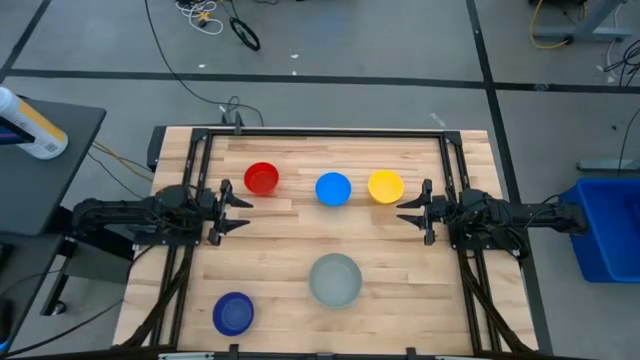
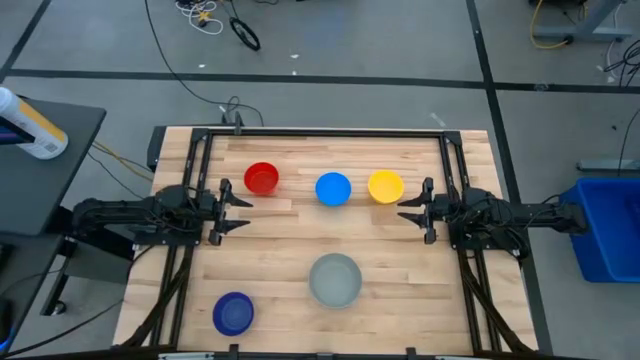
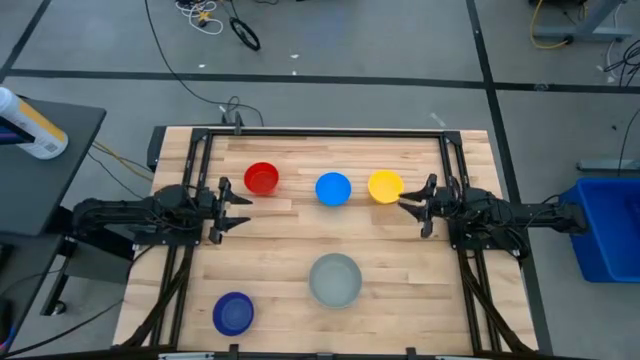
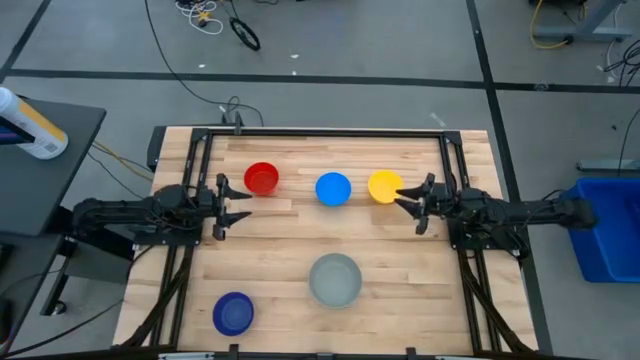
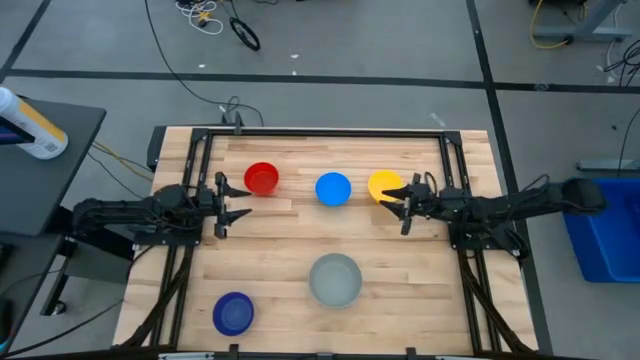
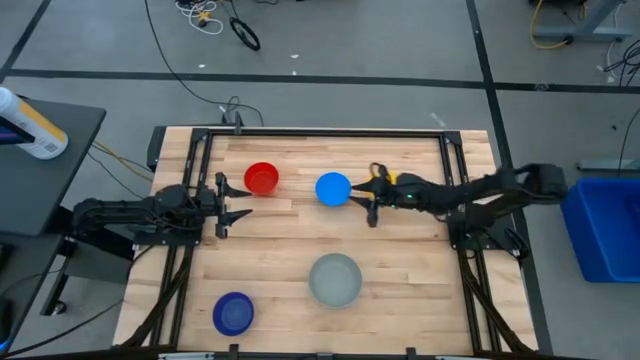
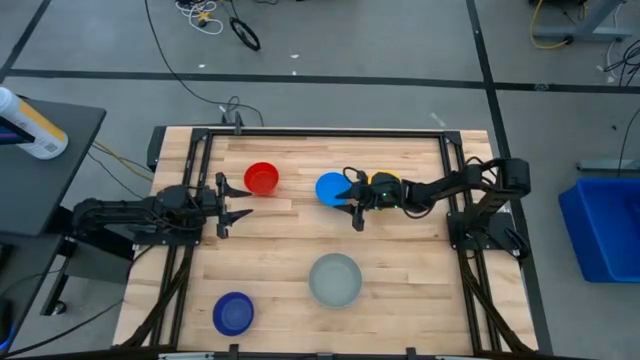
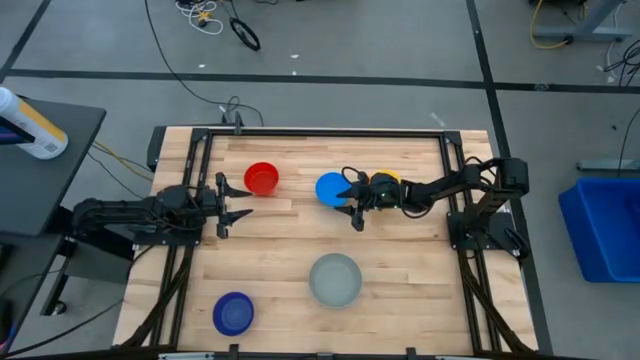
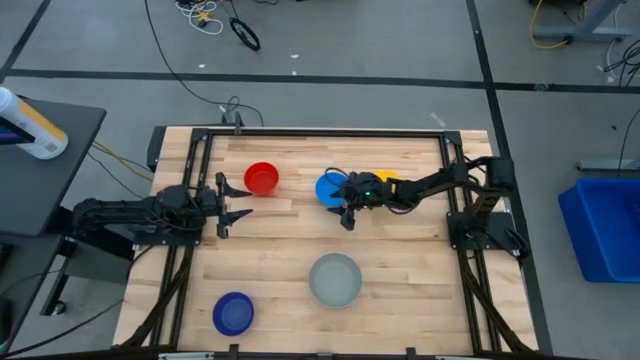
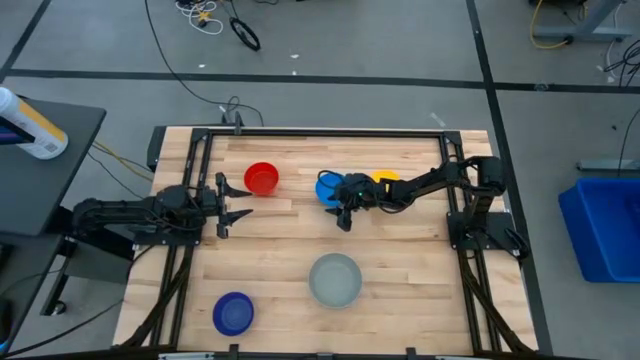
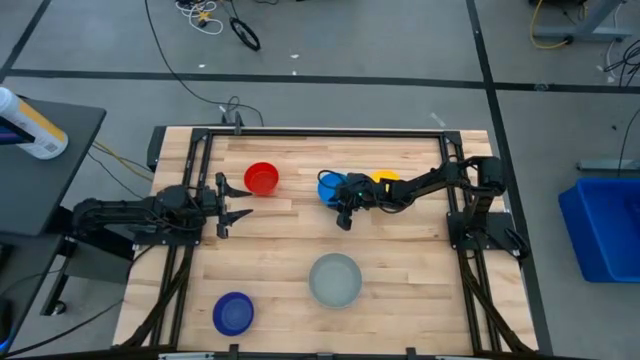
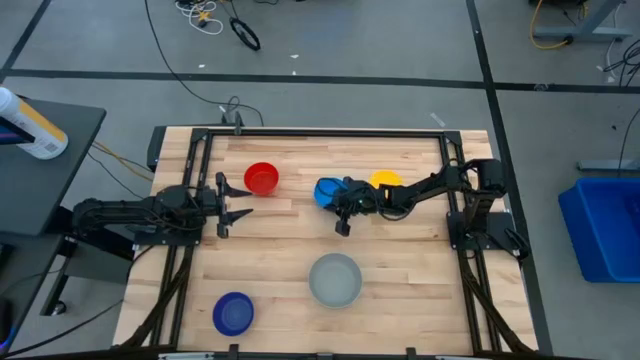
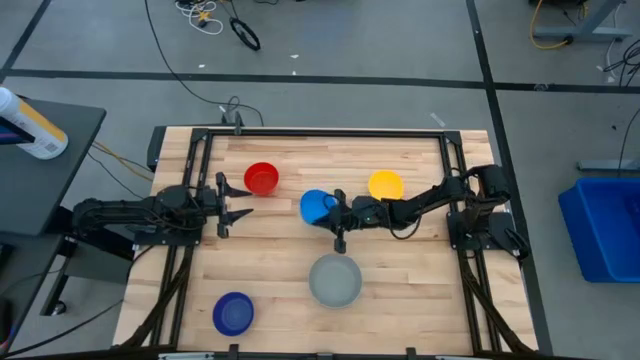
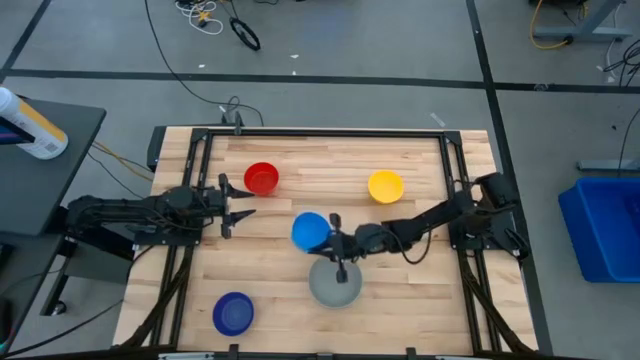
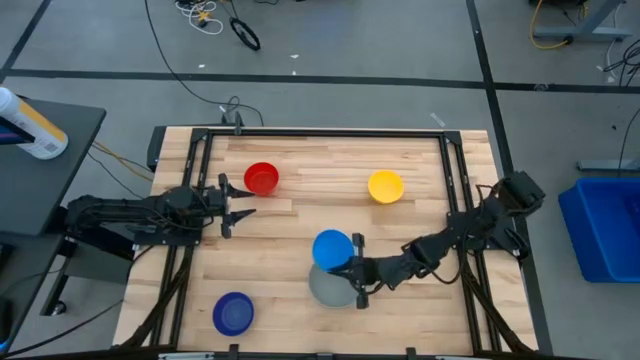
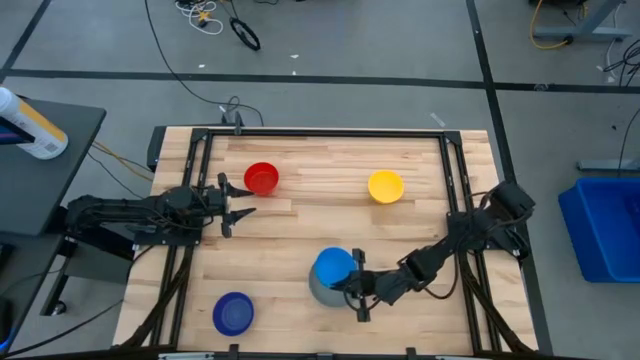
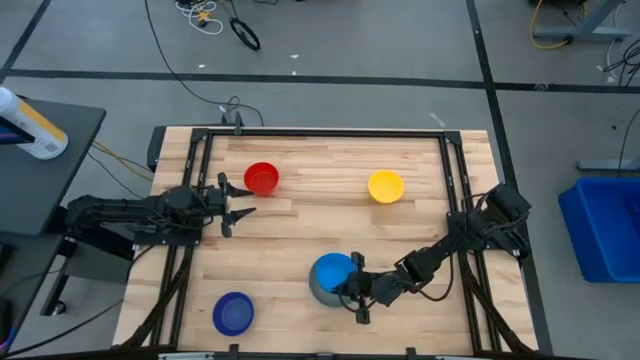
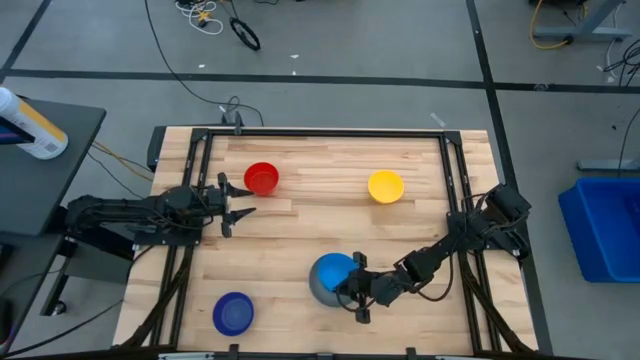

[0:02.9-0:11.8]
Stack the light blue bowl on top of the gray bowl

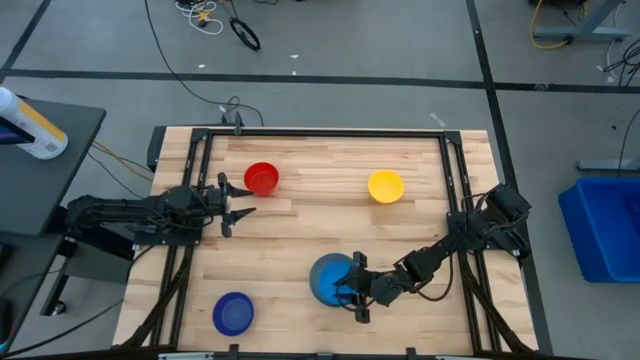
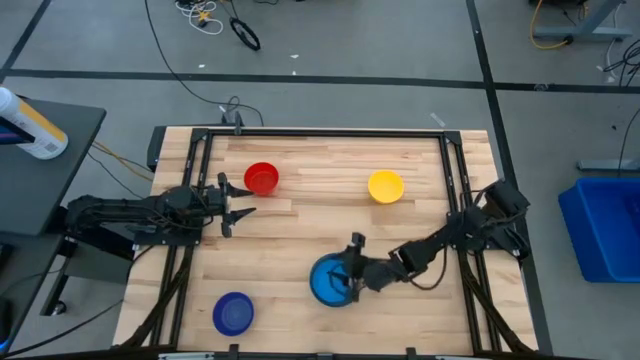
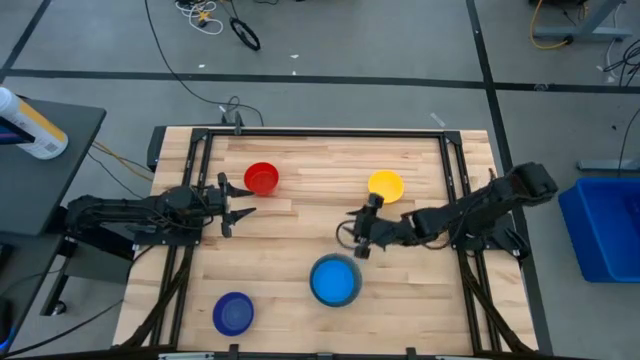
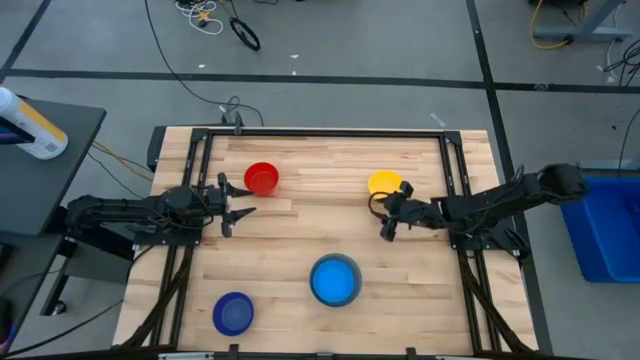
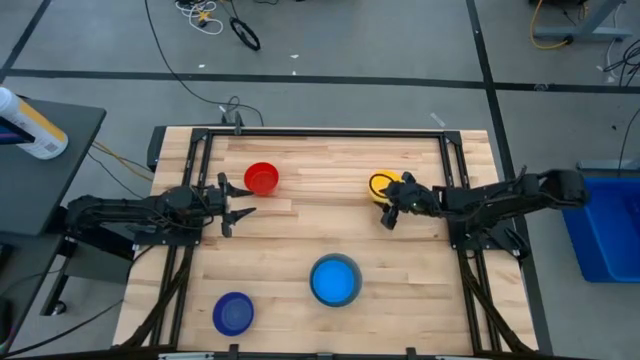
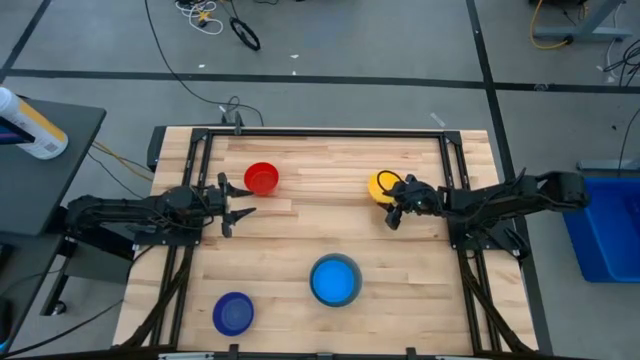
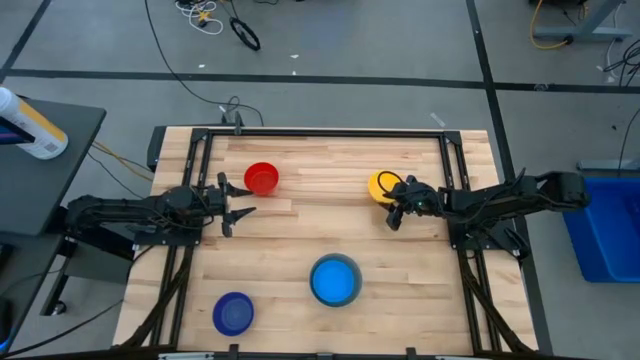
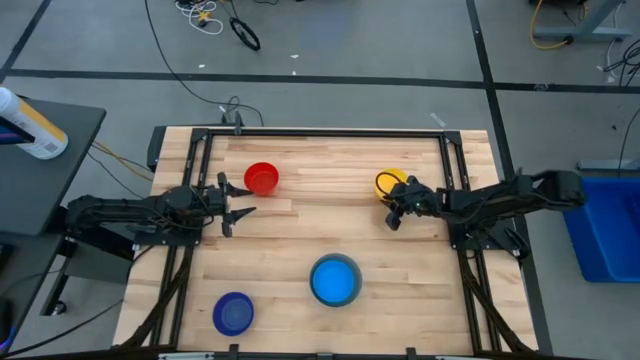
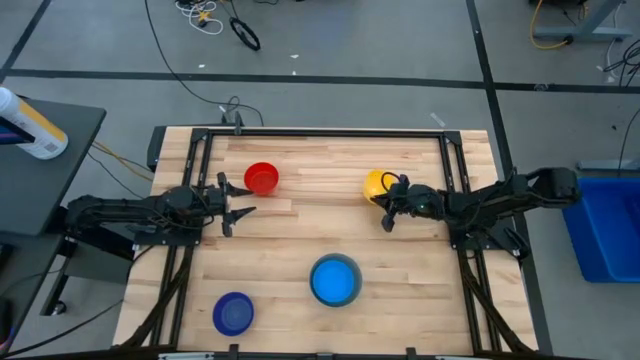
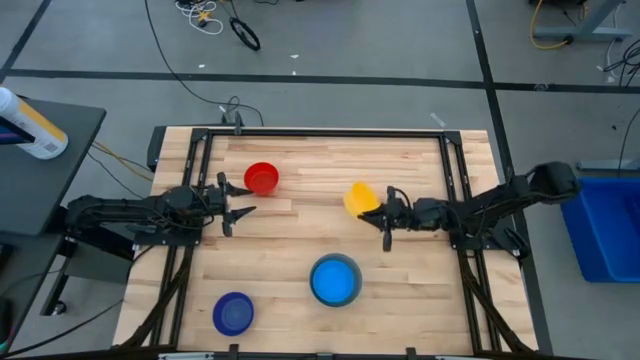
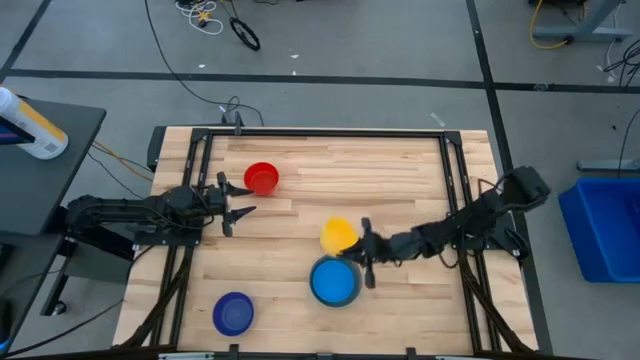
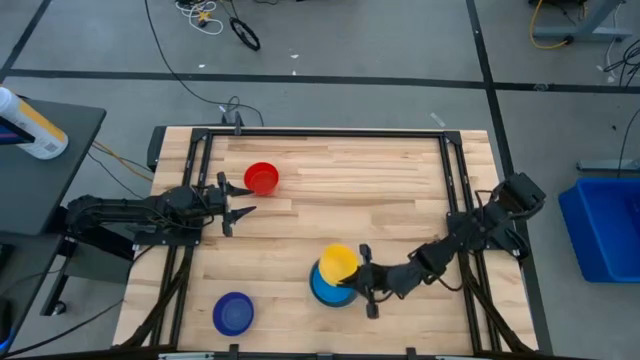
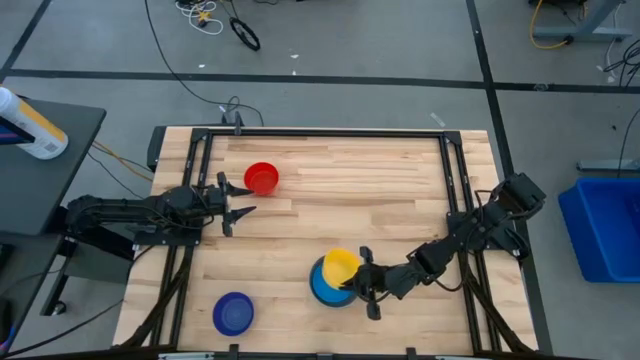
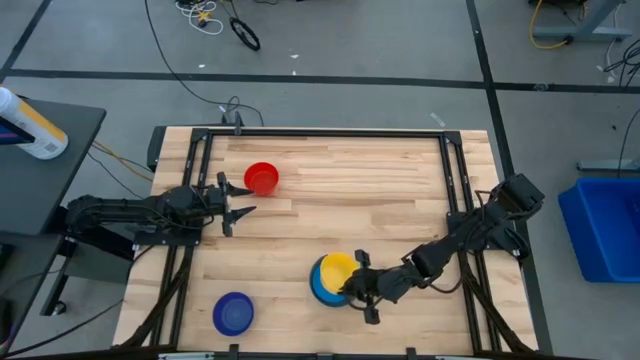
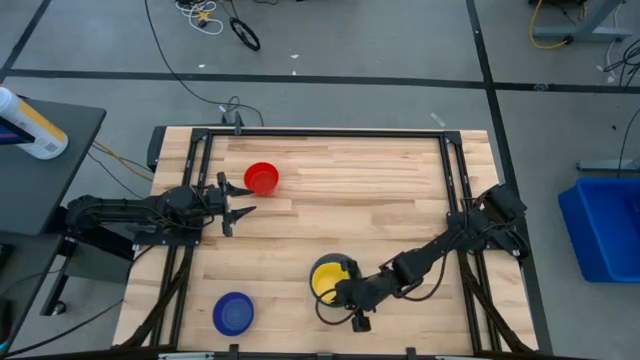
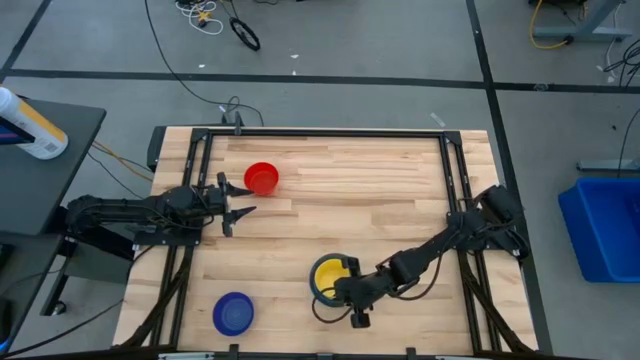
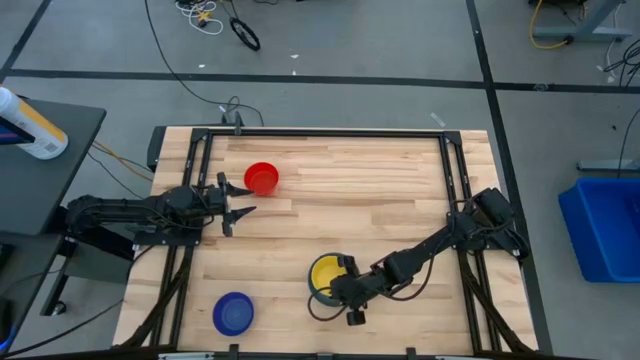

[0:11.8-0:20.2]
Stack the yellow bowl on top of the light blue bowl

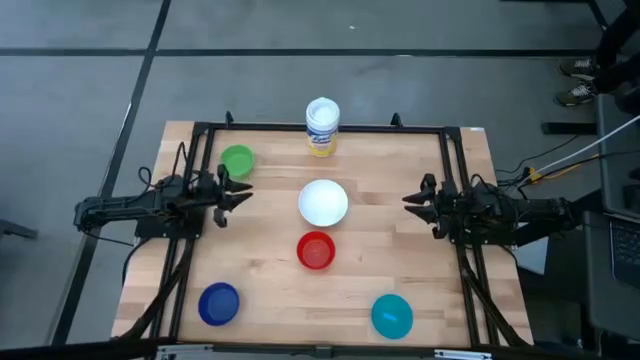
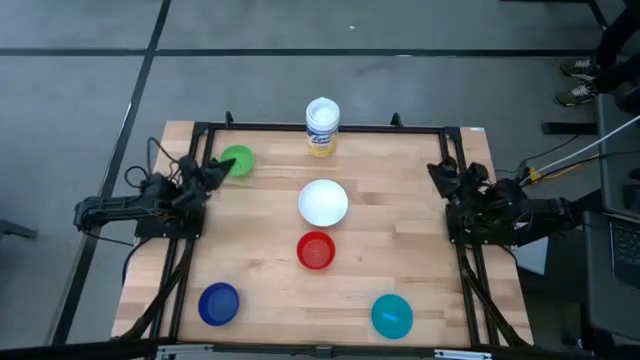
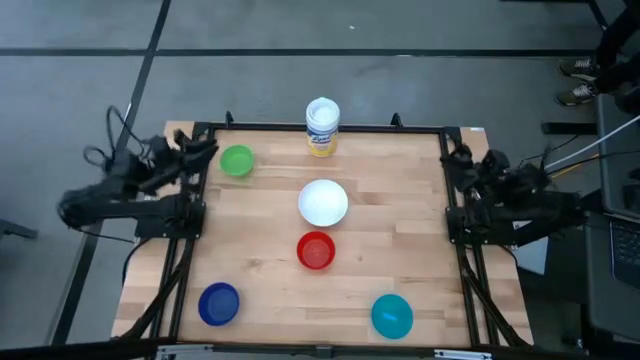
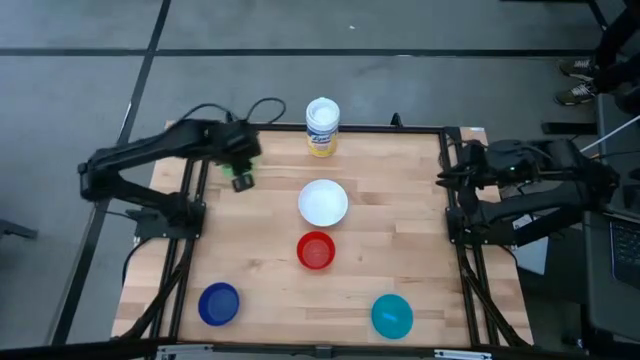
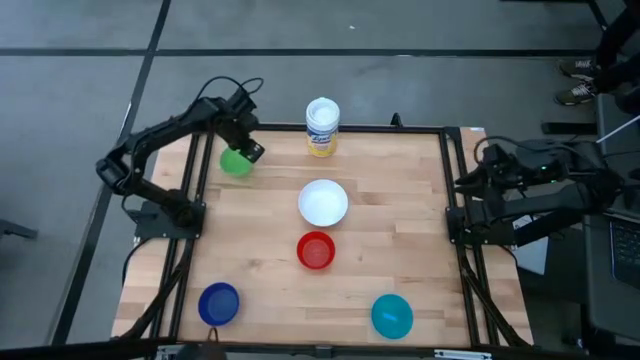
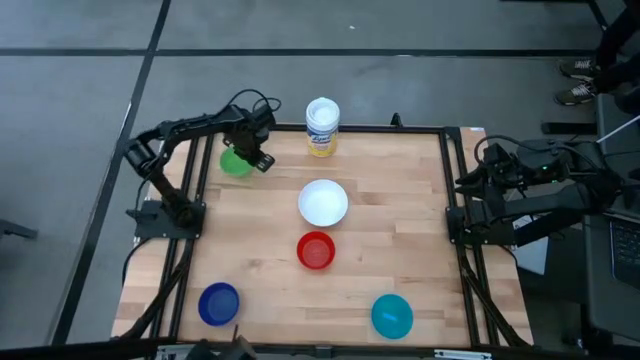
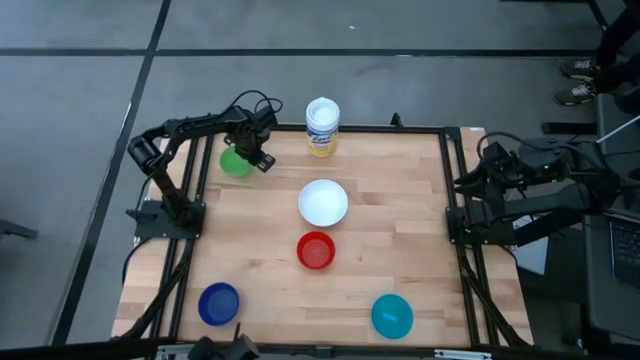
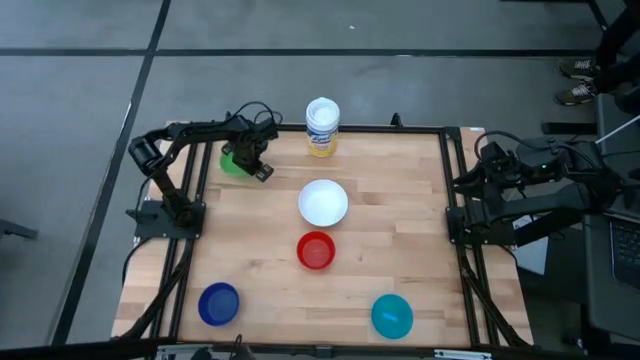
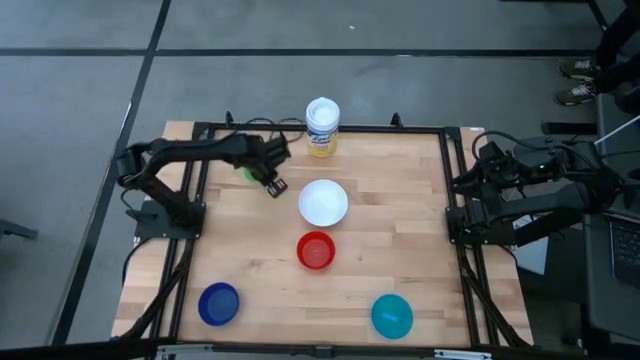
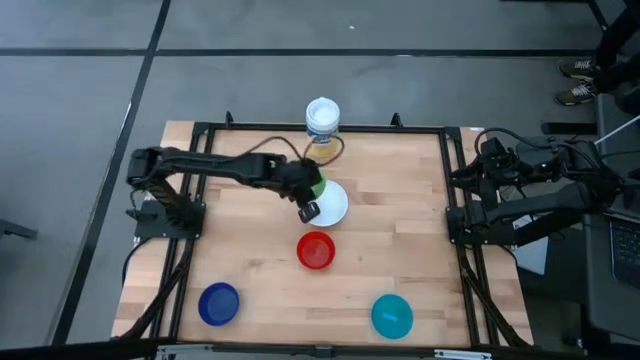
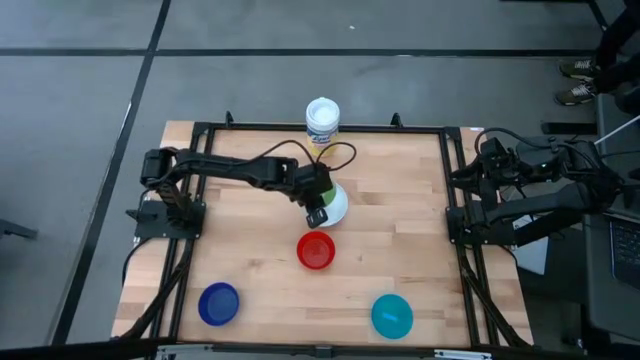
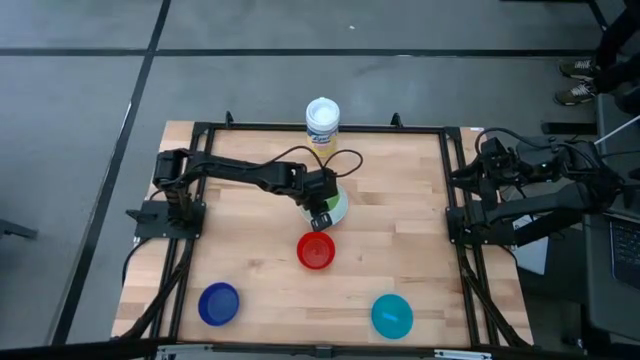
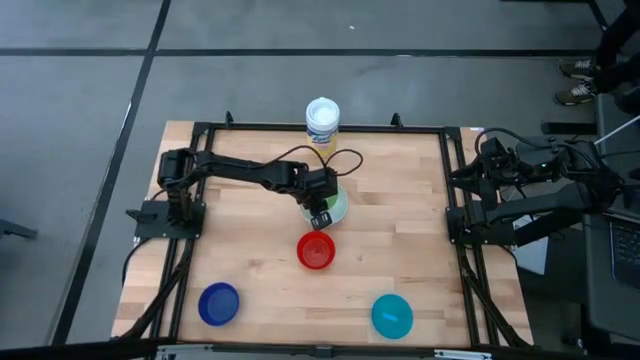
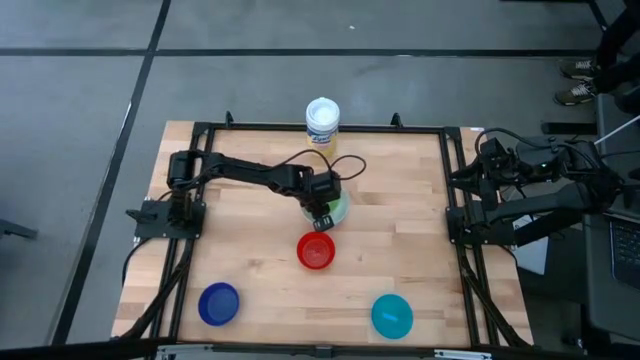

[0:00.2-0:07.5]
Stack the green bowl on the white bowl
